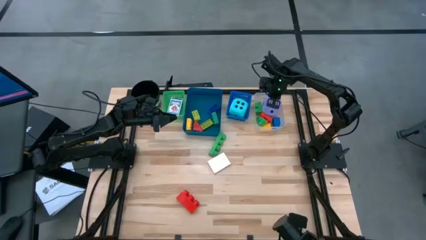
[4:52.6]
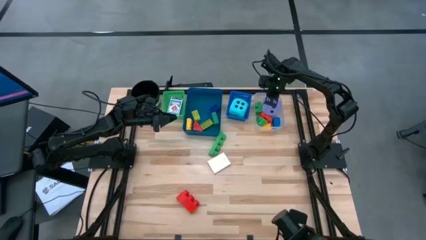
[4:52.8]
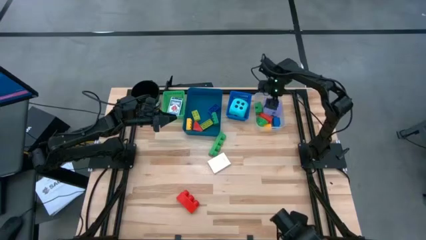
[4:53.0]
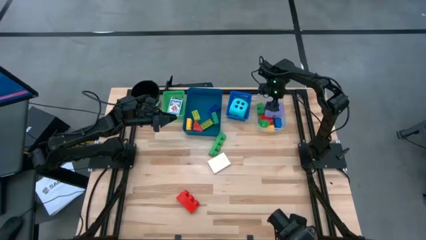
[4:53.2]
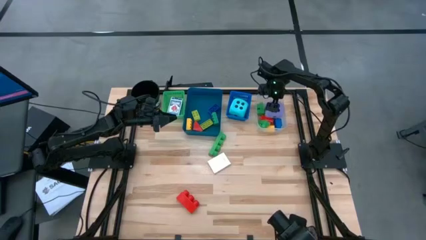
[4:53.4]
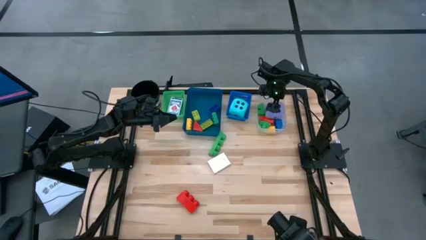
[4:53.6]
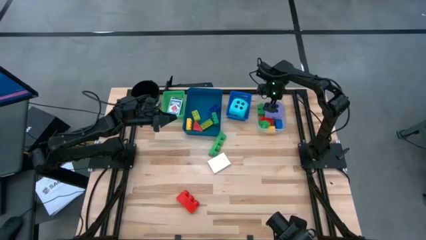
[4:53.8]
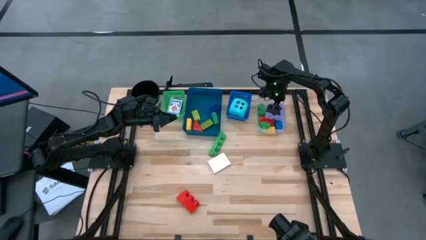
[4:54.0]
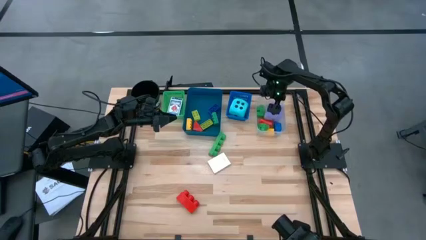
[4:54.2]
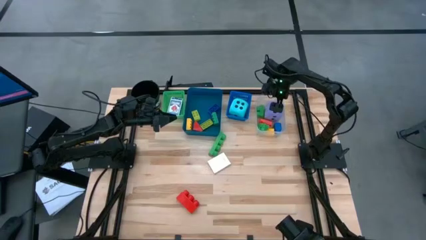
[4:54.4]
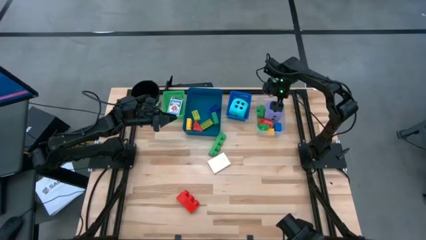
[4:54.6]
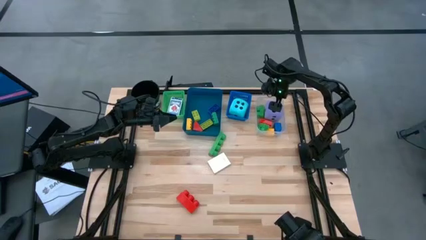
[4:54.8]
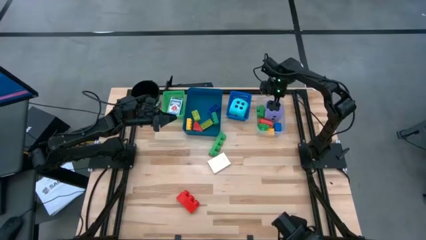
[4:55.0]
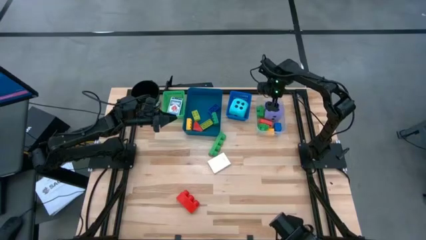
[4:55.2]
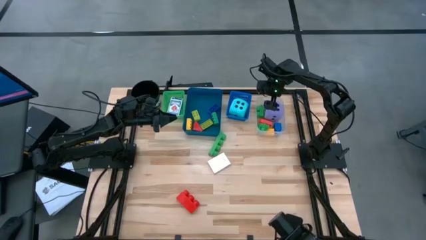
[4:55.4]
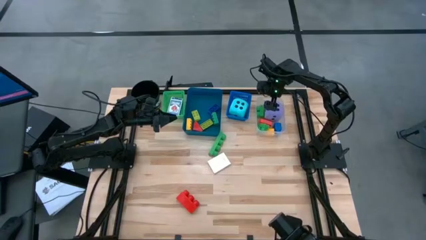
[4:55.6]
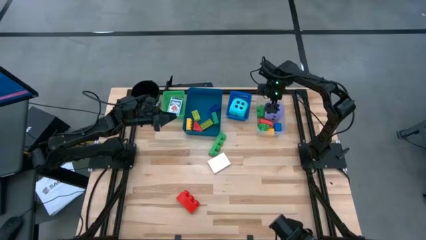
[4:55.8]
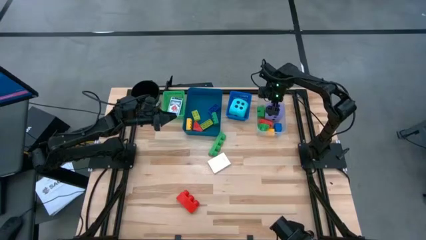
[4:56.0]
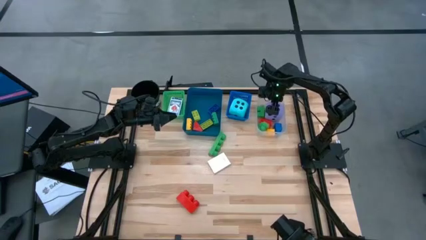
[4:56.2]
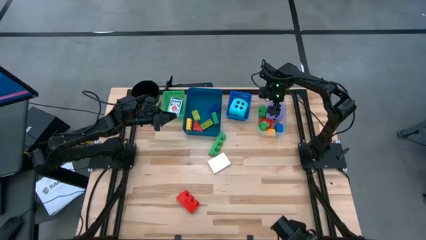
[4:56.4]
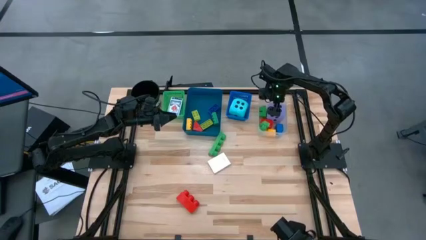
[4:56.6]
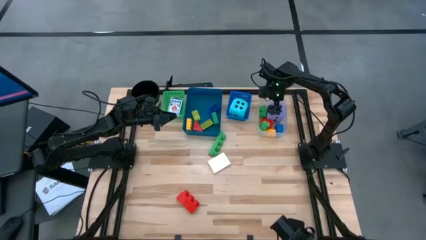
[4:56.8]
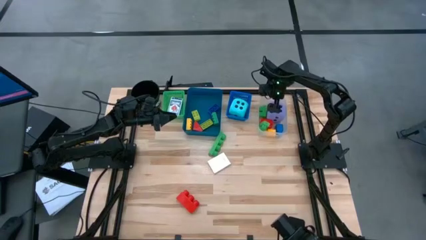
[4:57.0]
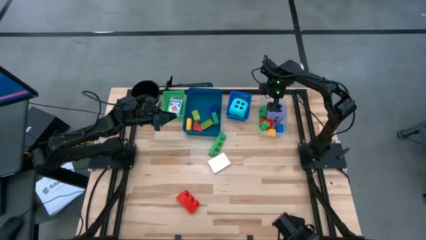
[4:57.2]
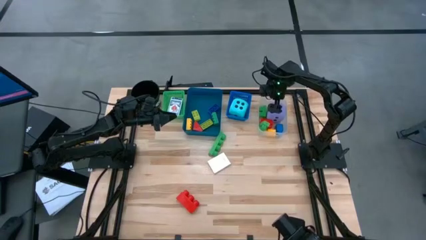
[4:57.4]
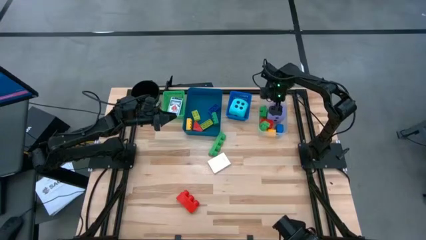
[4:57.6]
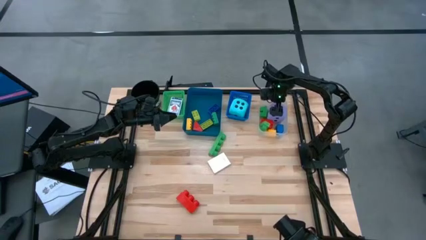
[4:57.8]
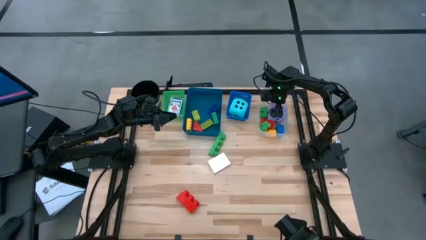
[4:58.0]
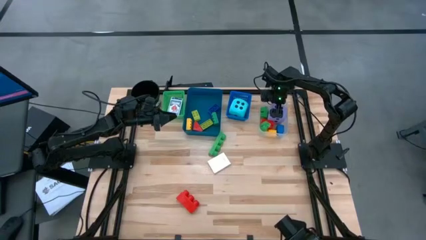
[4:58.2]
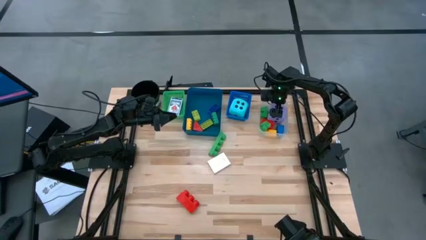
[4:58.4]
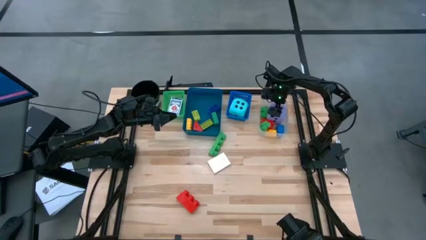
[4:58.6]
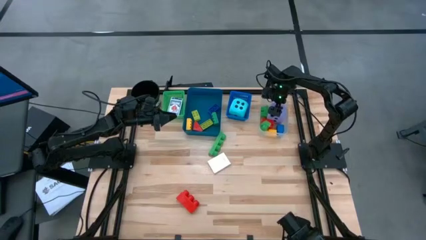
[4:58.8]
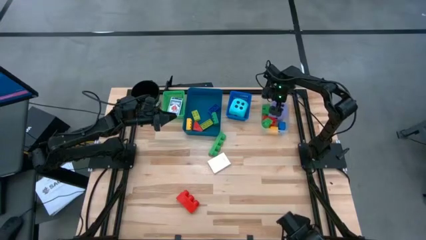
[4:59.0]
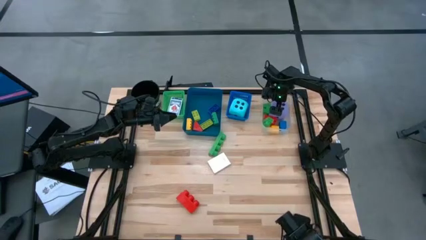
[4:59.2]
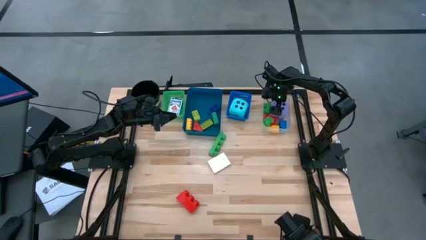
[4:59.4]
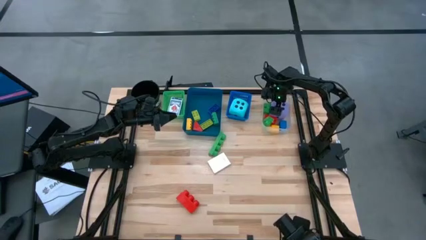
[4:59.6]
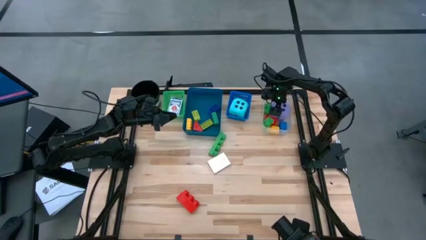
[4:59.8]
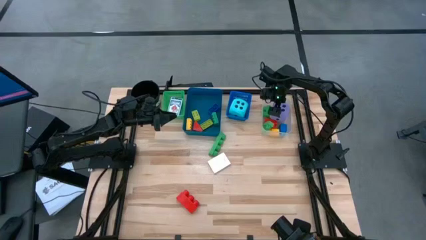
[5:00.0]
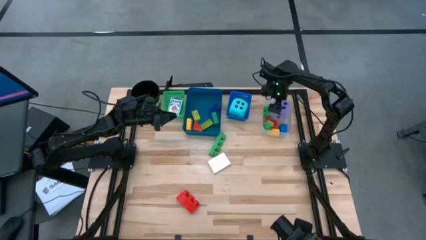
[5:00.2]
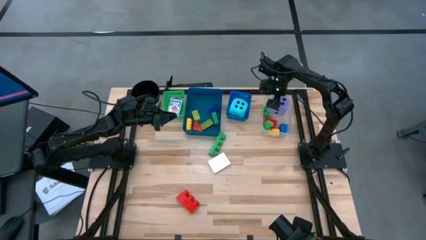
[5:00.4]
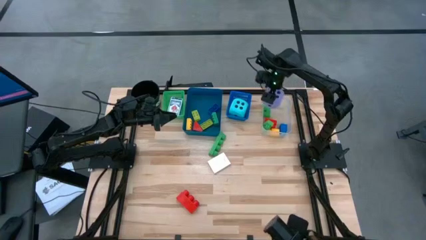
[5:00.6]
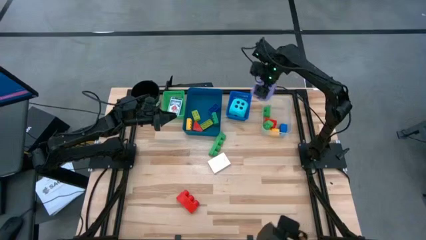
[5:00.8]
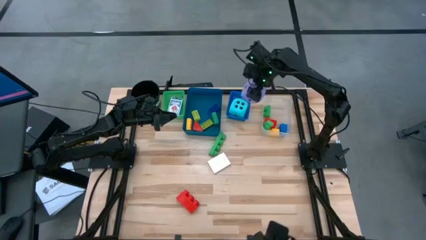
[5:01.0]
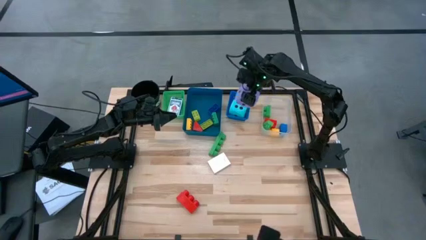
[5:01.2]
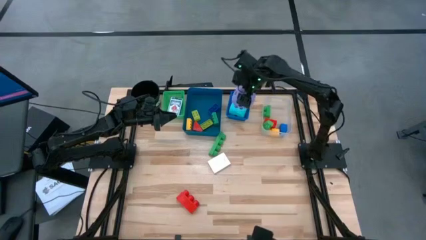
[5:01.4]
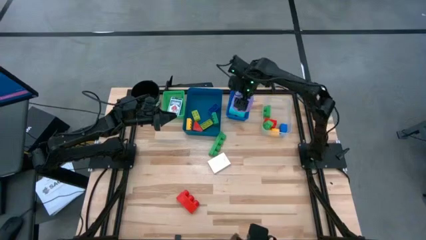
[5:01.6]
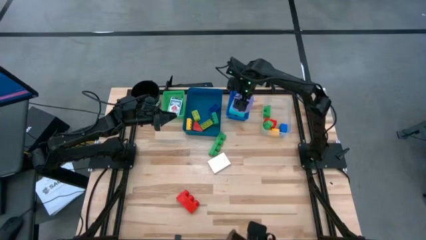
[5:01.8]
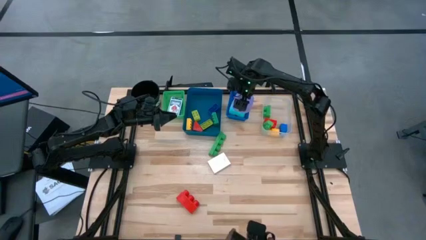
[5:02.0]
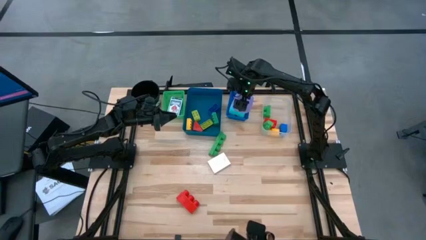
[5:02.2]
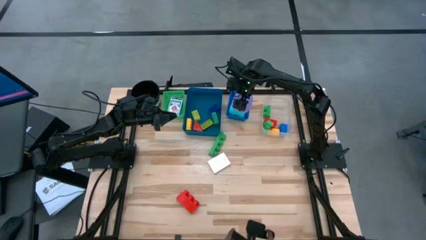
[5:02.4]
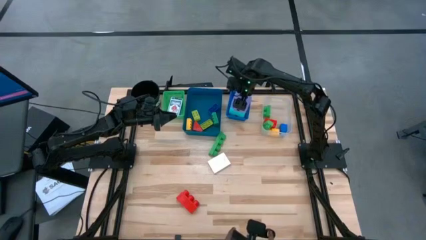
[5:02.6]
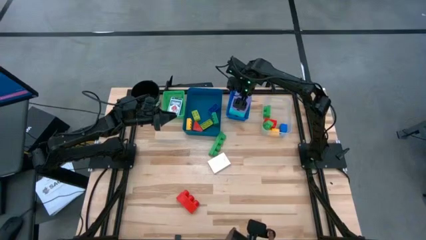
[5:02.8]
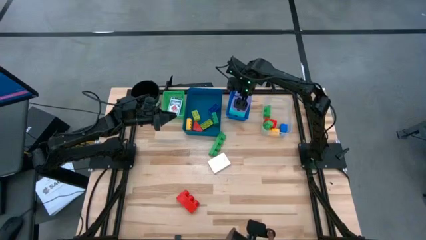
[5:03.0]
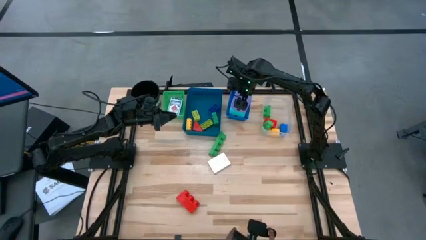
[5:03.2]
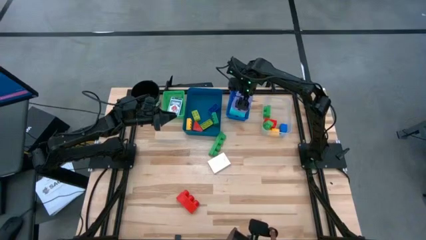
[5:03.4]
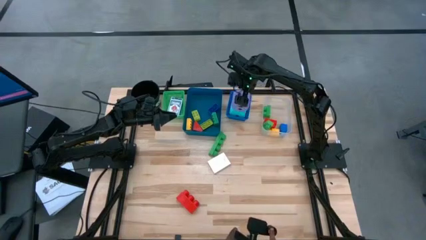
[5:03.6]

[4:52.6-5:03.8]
Task: Pick & Place Toys
Put the purple dice into the blue bin

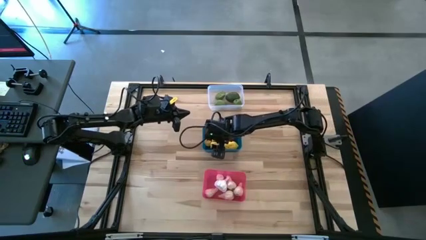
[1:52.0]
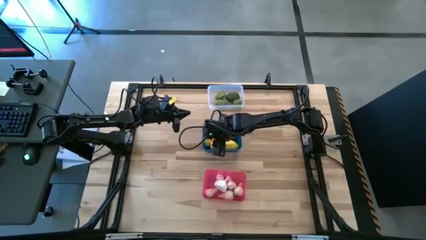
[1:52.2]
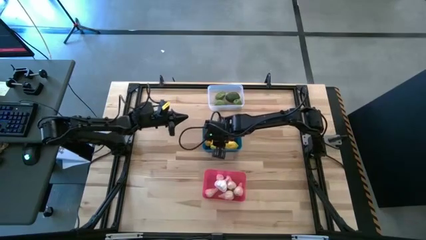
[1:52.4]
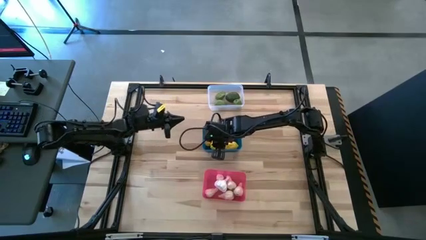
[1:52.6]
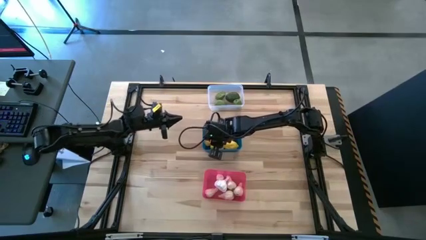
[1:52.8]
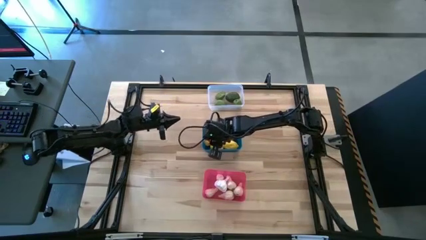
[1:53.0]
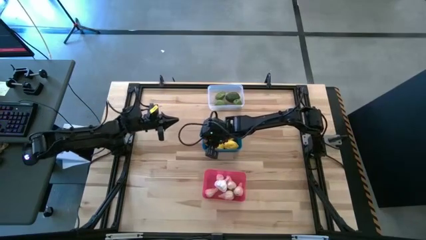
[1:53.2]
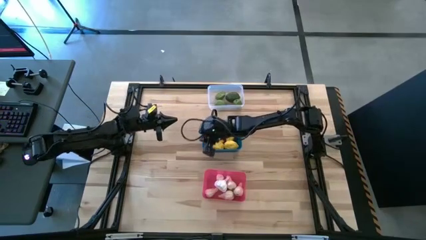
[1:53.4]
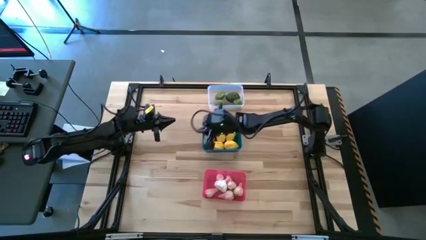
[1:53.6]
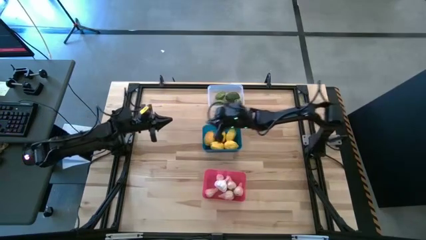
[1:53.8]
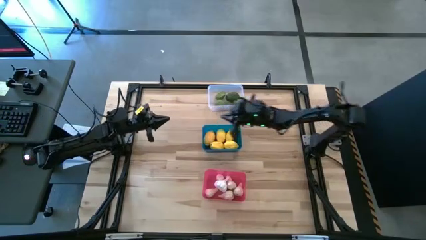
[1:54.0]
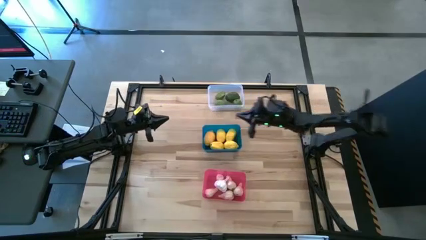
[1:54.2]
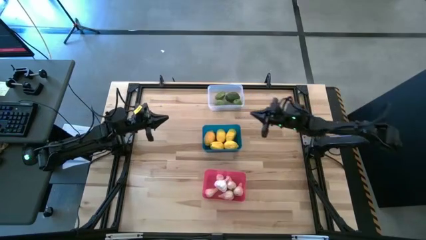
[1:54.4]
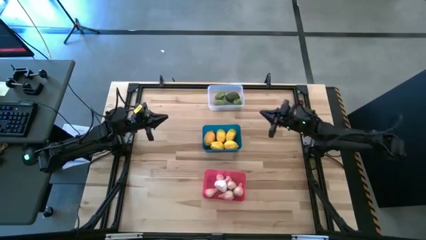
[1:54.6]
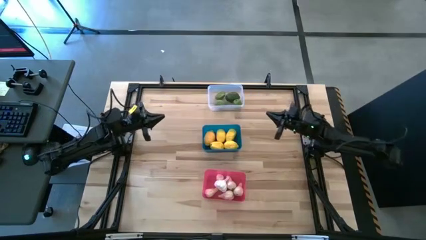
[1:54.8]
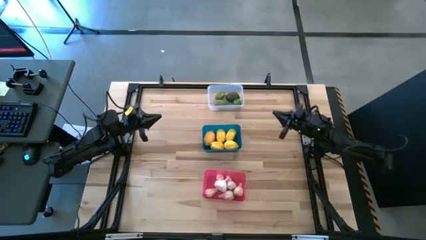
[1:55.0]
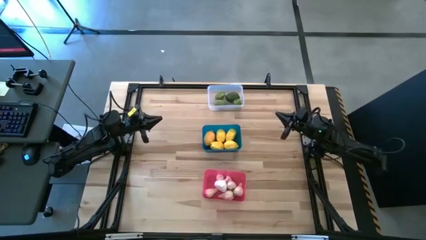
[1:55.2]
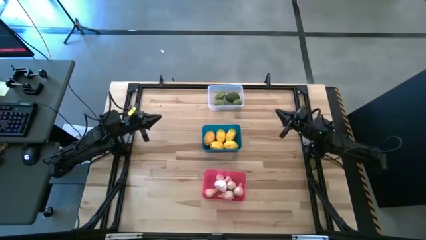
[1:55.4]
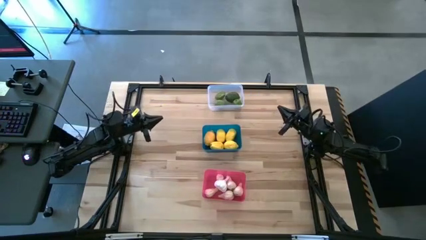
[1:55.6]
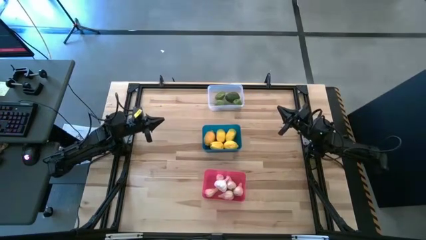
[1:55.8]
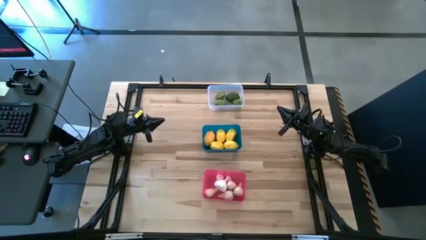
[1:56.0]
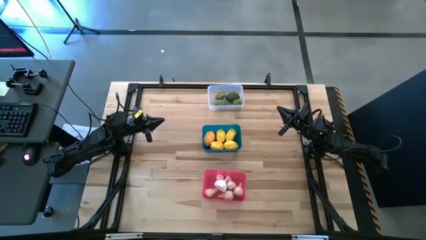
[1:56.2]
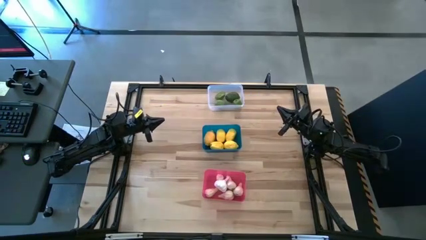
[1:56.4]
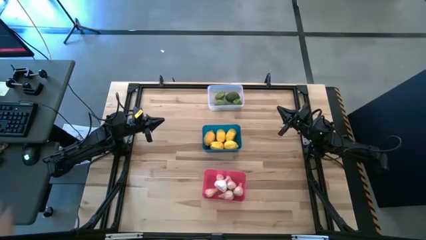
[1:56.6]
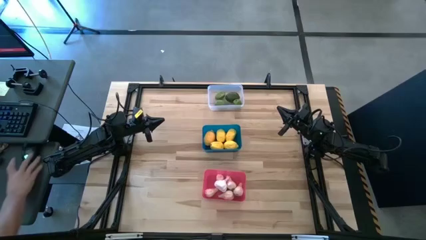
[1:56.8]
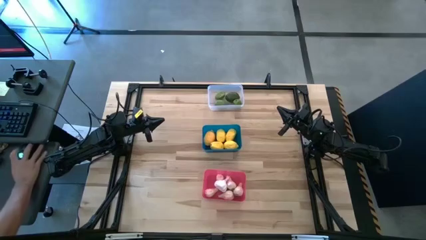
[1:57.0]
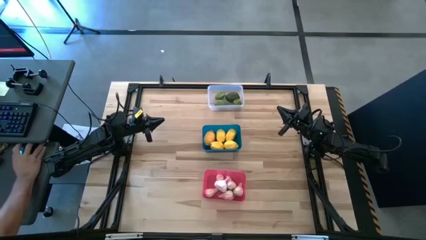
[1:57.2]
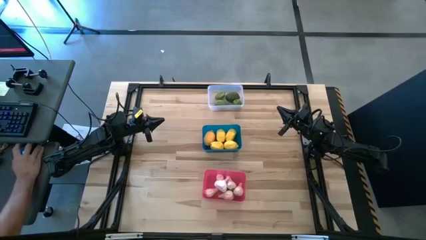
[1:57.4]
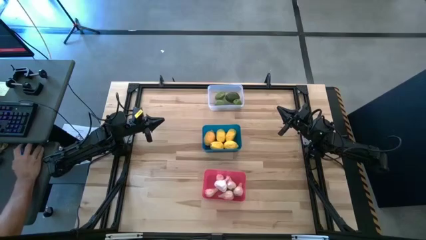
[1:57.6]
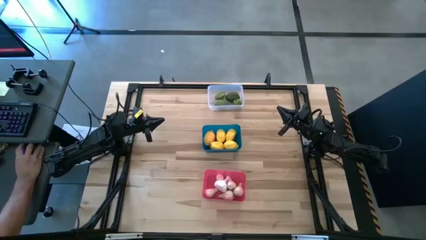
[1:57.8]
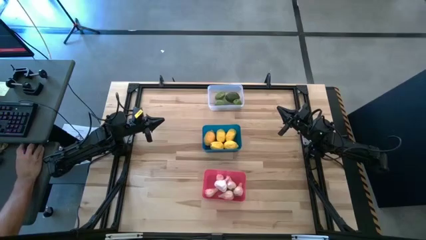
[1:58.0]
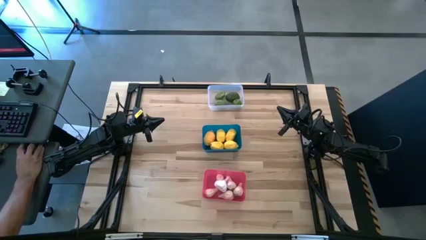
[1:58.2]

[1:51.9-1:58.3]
Task: Sort produce into baskets
Return to Home Position
